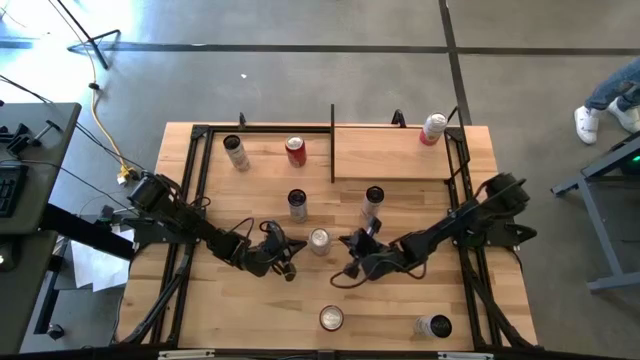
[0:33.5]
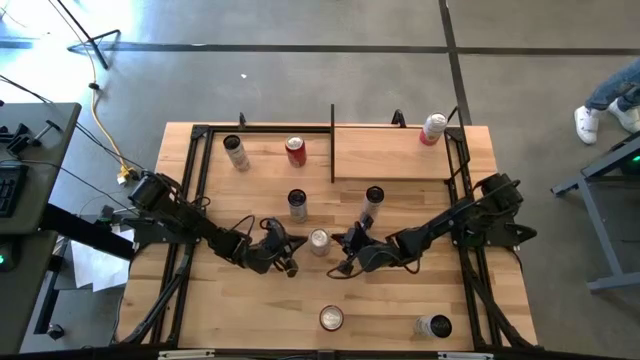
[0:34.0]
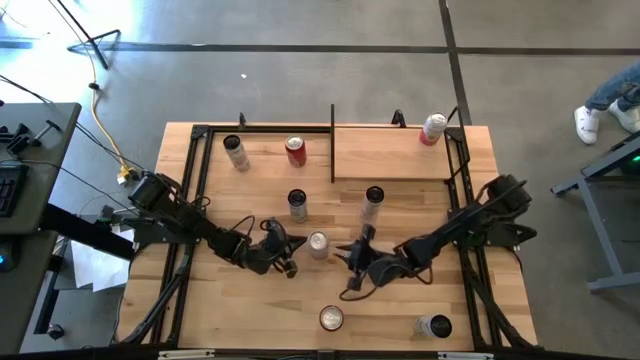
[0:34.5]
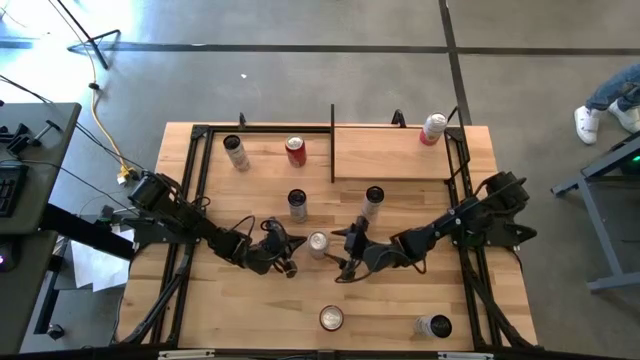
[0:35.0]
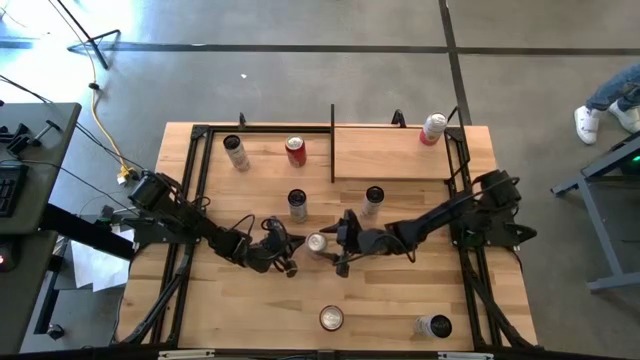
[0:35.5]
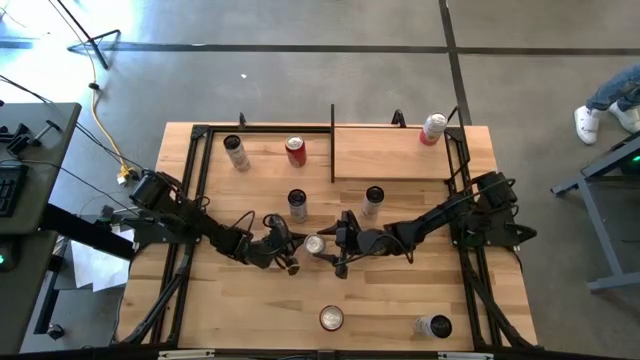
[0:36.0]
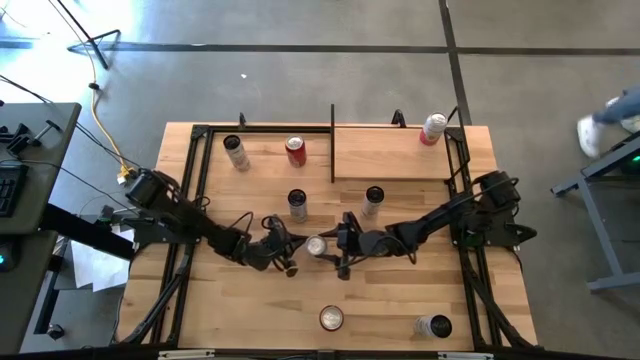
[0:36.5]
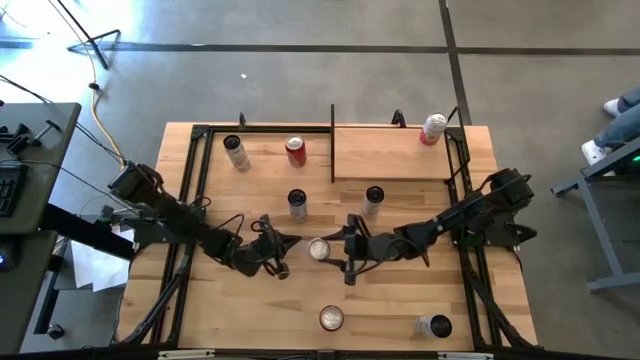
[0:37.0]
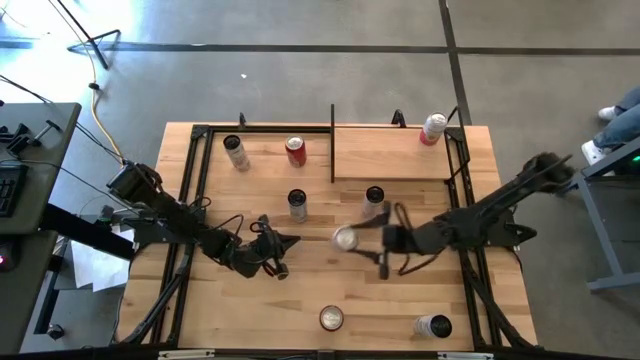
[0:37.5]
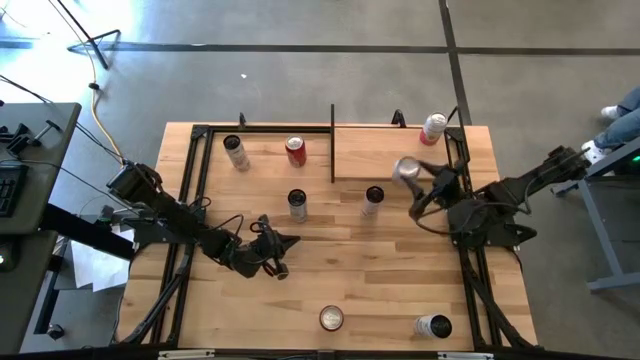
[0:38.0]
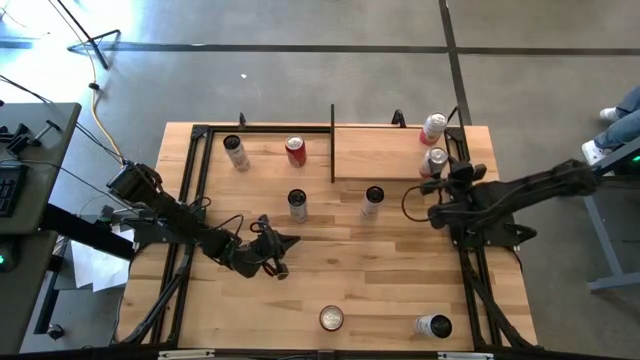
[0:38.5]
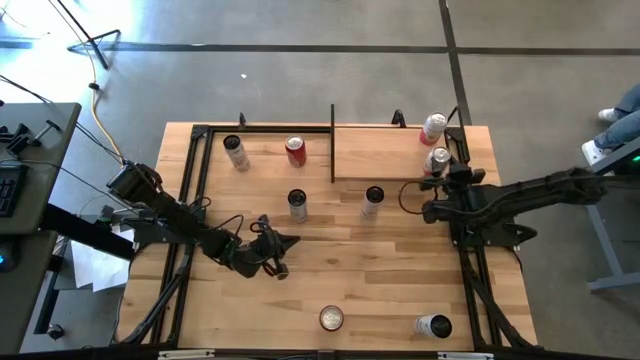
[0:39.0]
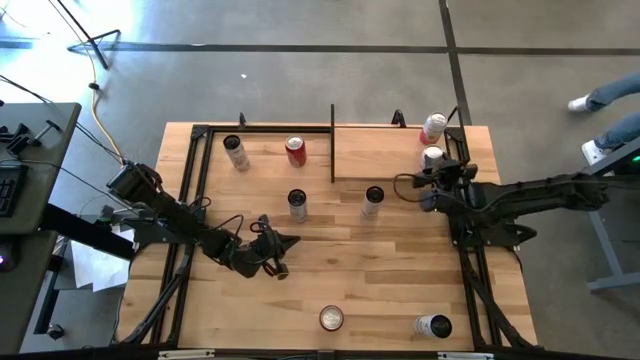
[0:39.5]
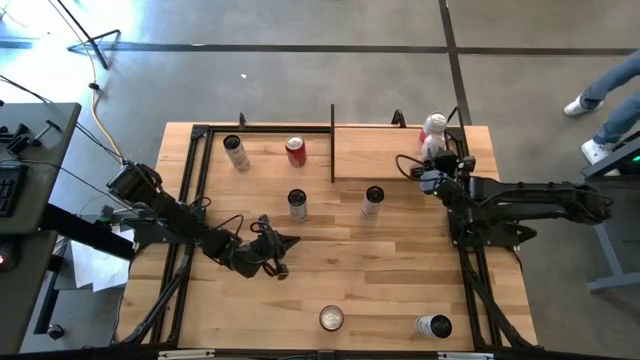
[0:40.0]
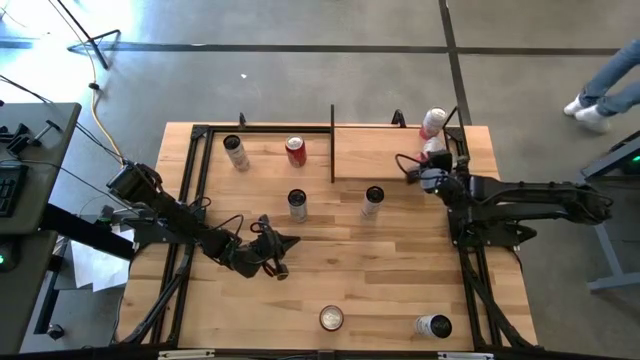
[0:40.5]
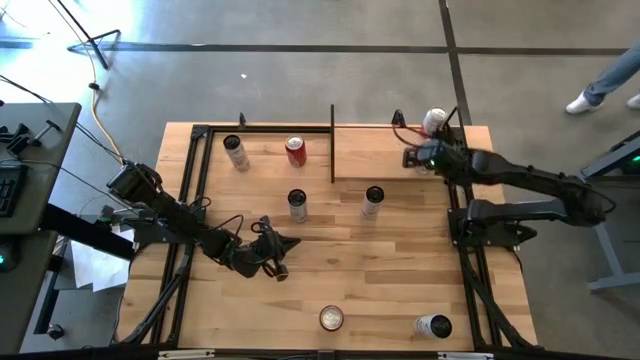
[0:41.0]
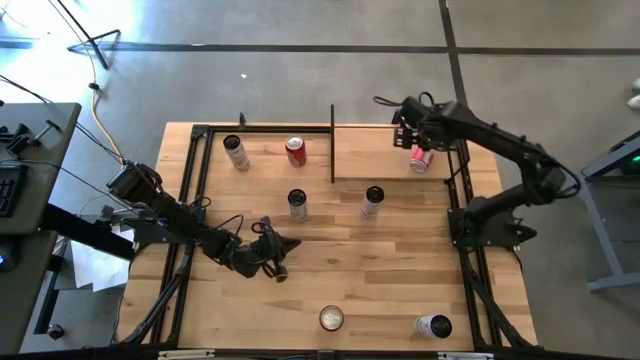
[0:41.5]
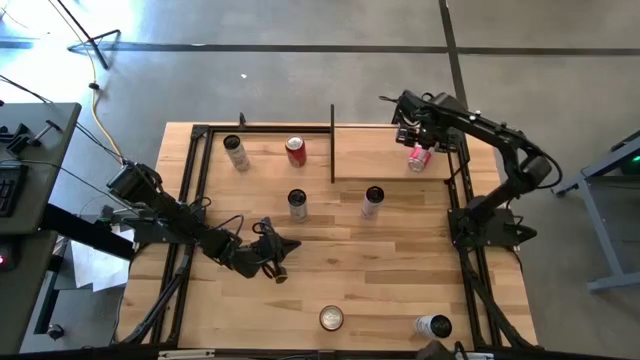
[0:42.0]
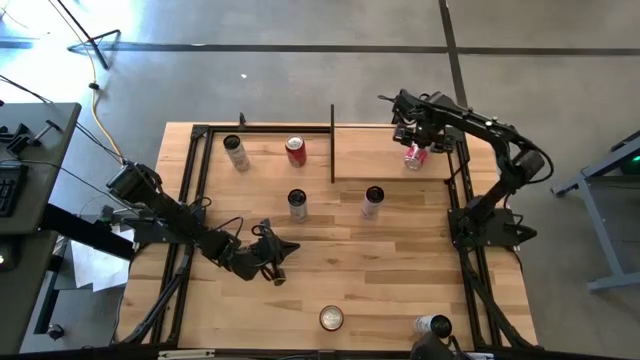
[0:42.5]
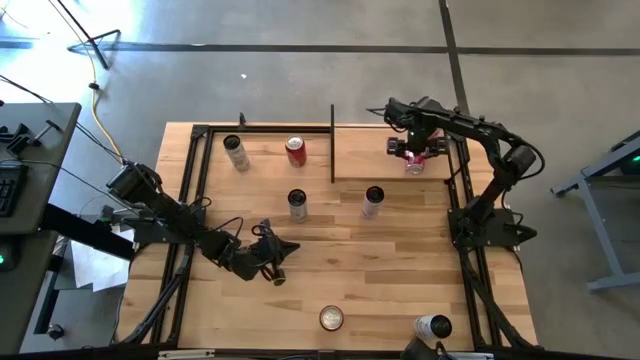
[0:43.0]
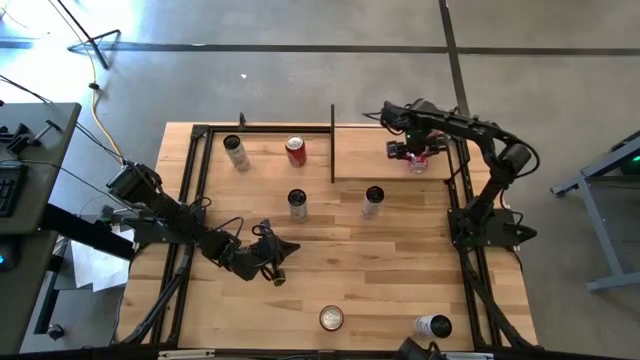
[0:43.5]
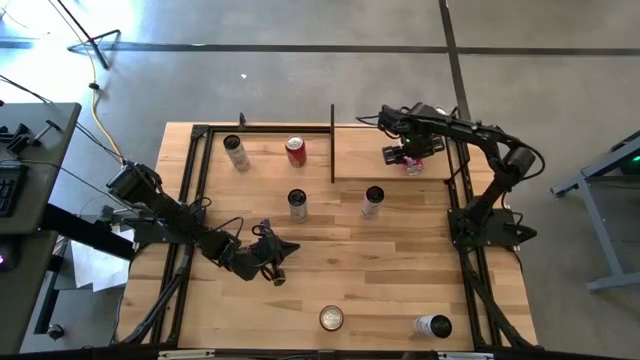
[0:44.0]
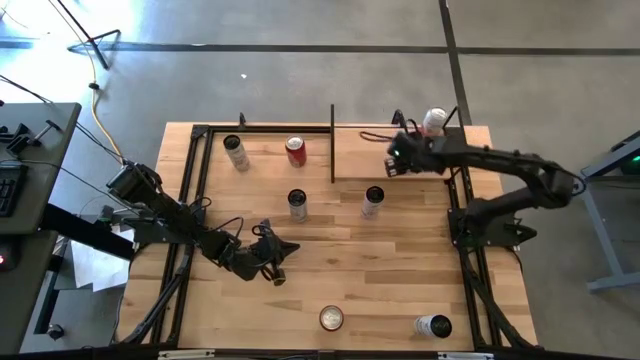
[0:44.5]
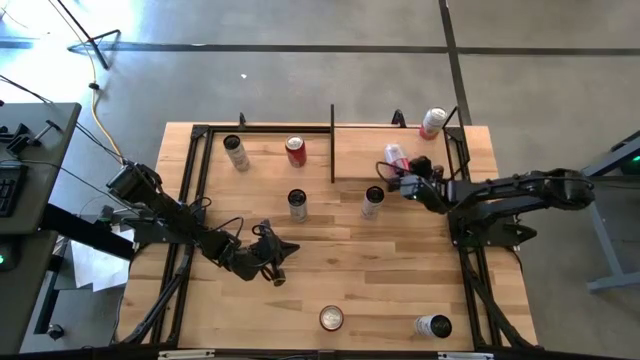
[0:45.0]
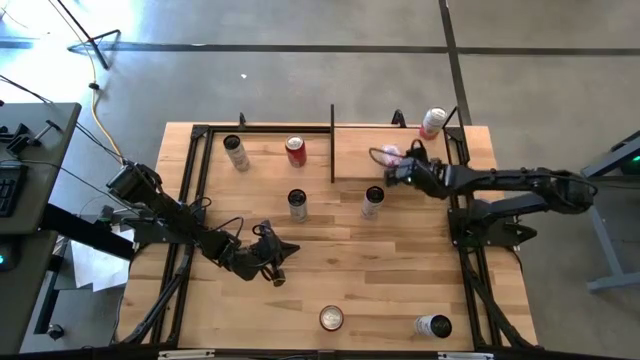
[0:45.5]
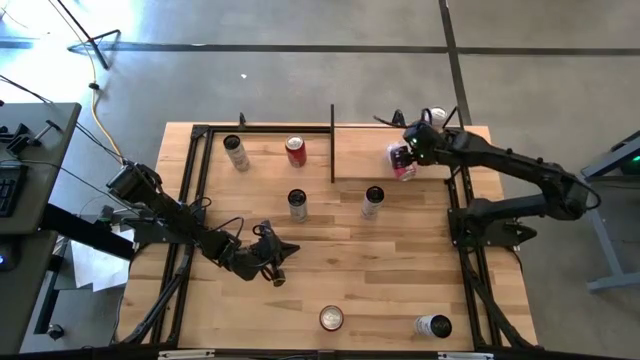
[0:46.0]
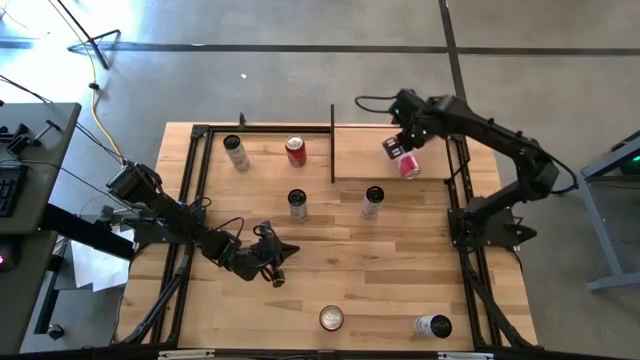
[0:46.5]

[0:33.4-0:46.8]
Task: Place canned beverage on shelf
Put the pink soda can on the shelf aligned with the other pink soda can

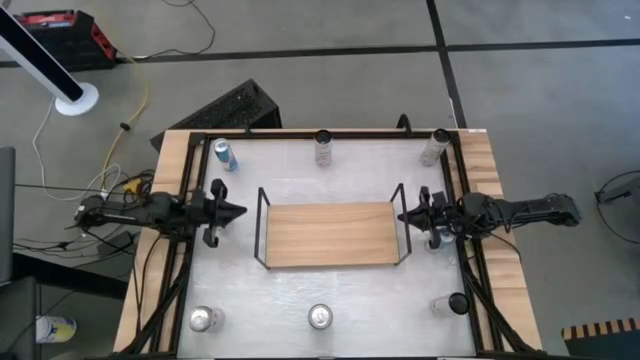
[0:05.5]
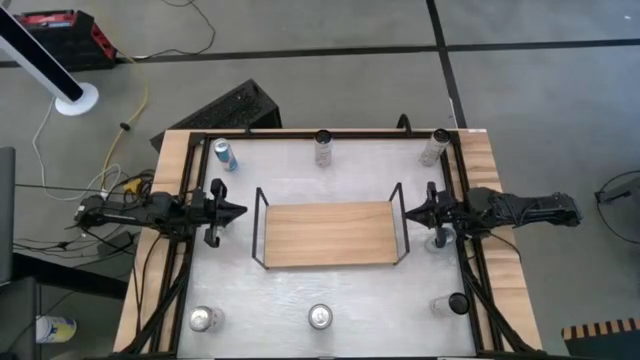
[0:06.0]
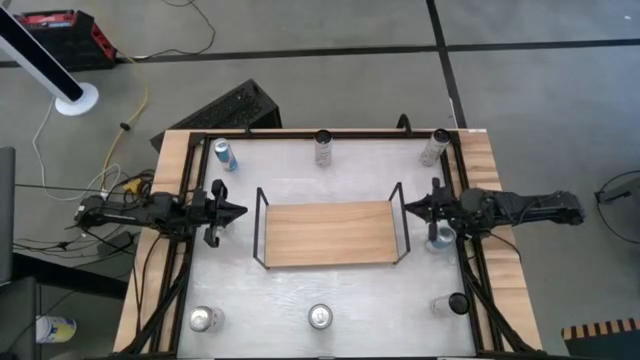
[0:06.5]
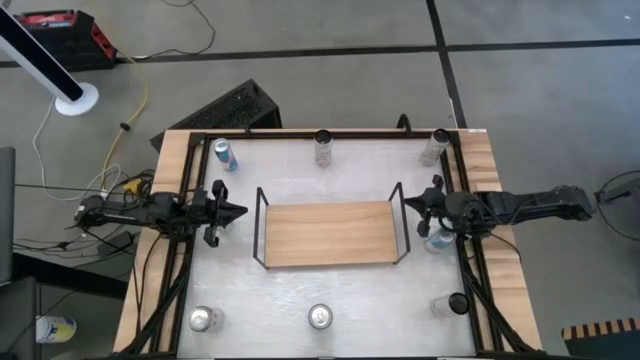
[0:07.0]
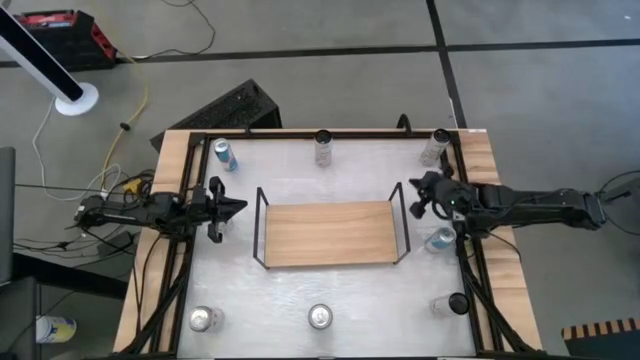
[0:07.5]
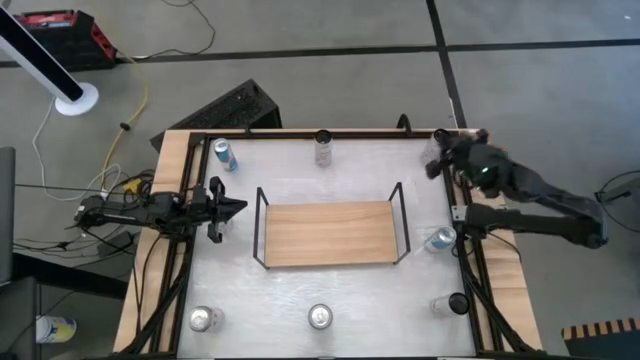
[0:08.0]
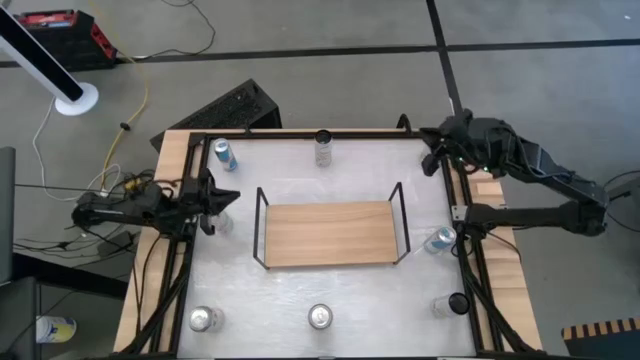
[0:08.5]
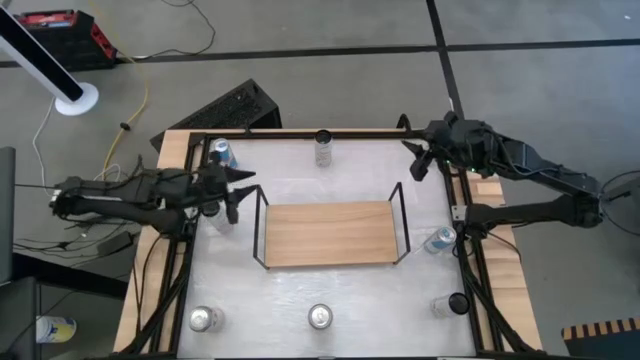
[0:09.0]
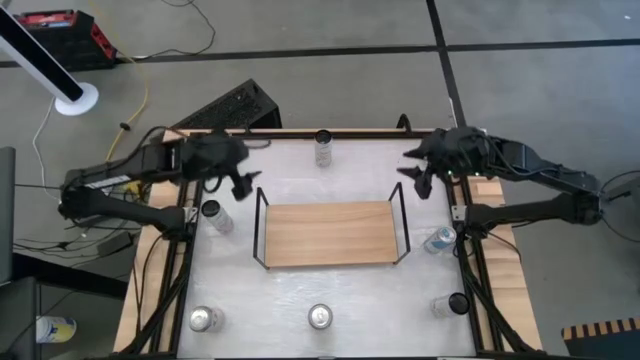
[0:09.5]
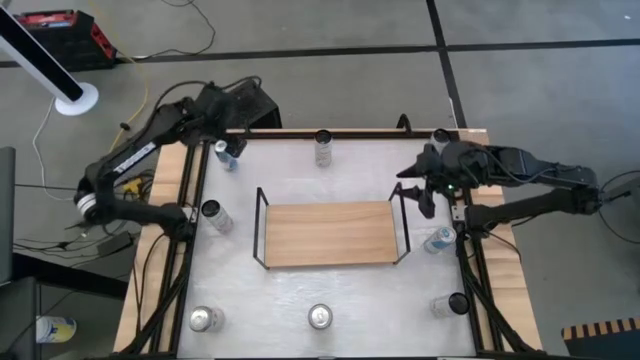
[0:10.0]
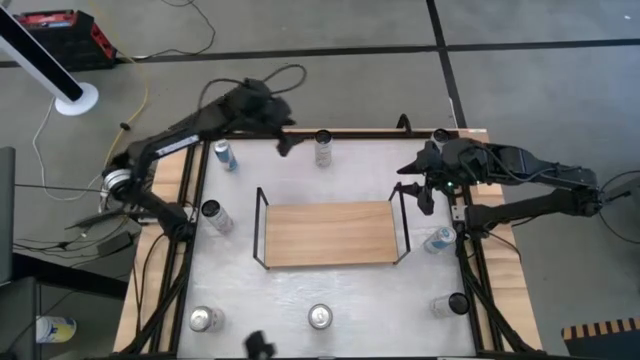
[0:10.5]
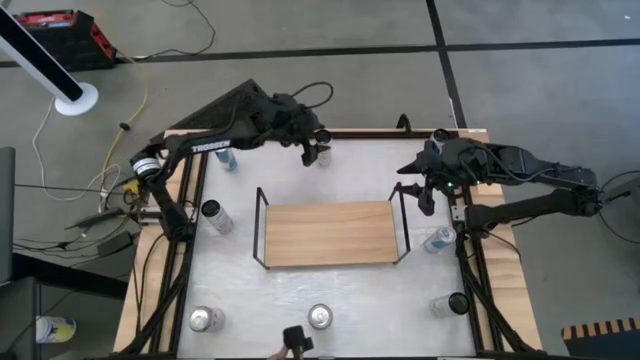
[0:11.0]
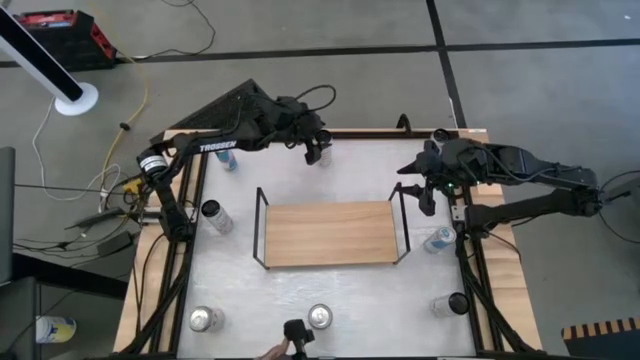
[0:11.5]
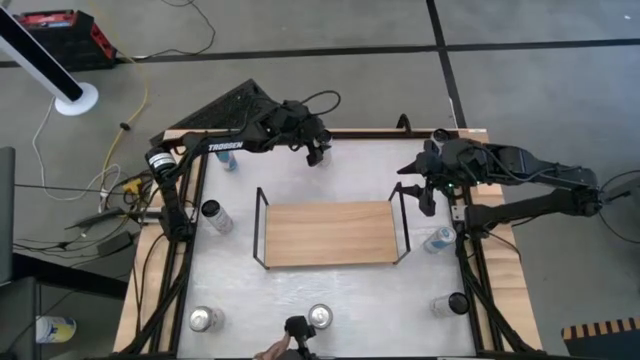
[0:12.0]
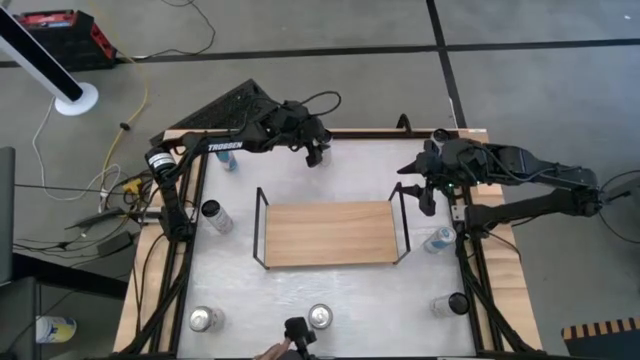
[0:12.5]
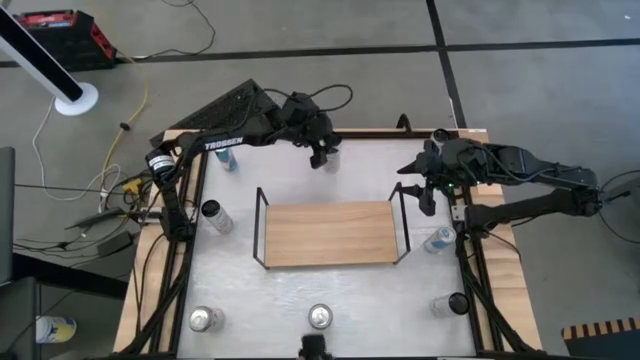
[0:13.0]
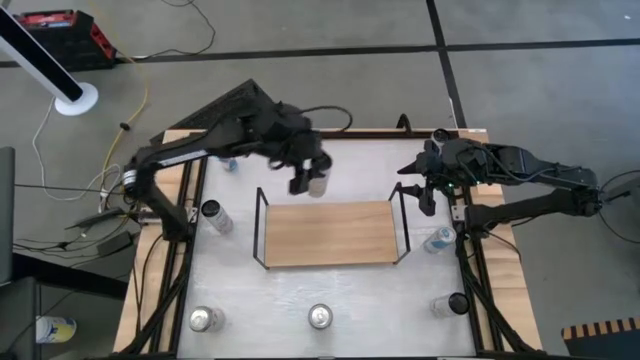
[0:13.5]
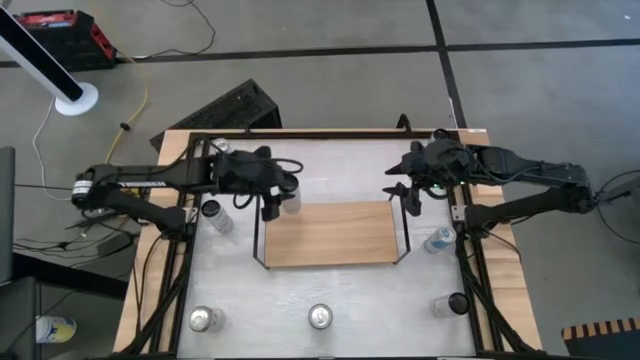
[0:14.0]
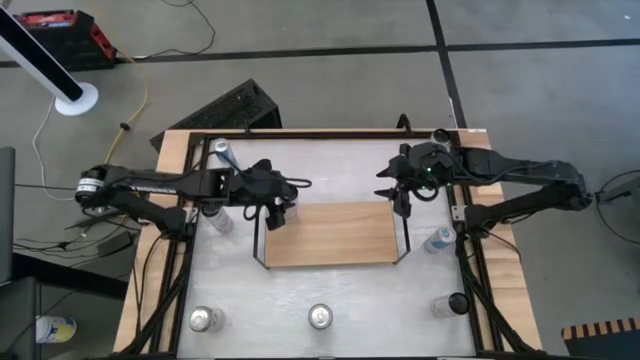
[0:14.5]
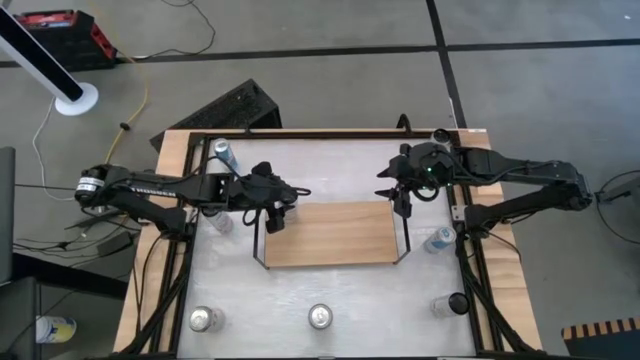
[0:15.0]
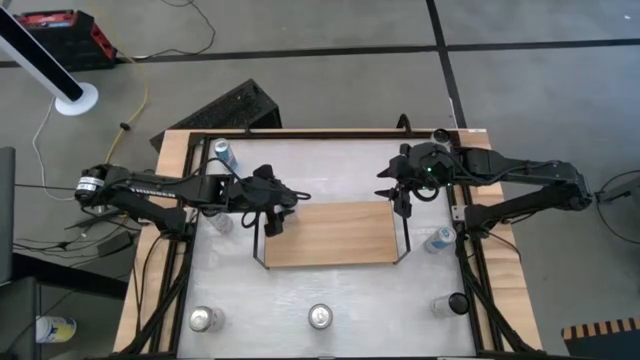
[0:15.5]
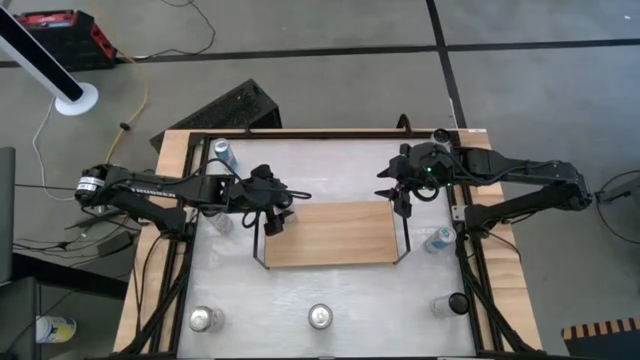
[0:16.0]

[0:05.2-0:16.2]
Task: Place canned beverage on shelf
Put the left white-yellow soda can on the shelf
